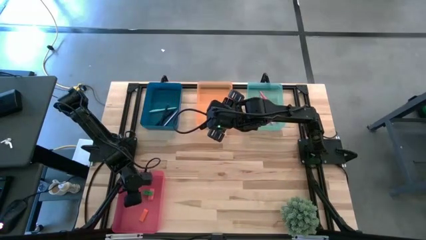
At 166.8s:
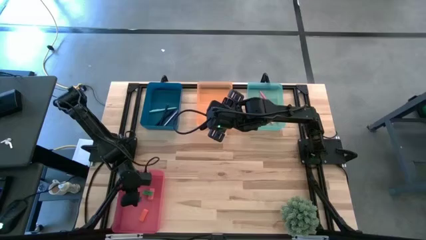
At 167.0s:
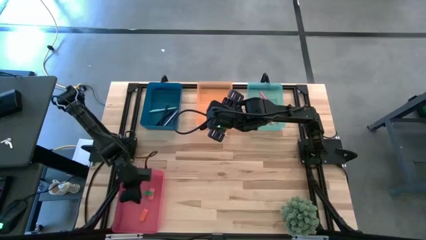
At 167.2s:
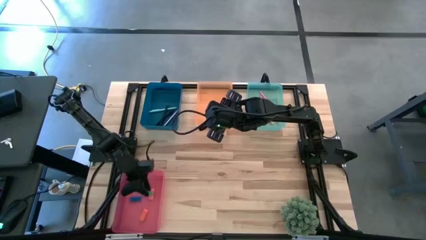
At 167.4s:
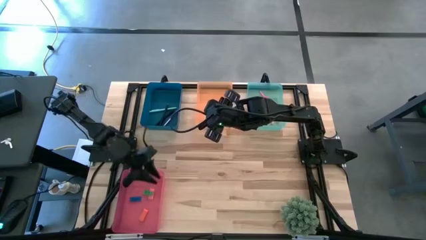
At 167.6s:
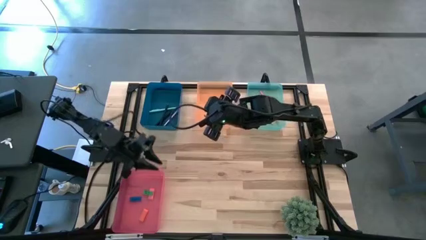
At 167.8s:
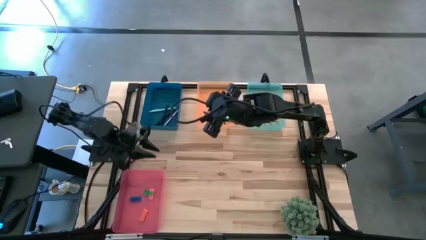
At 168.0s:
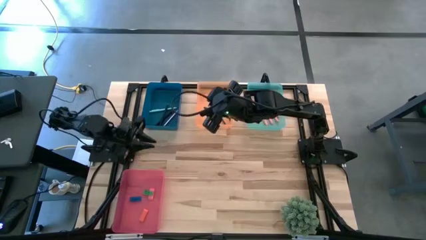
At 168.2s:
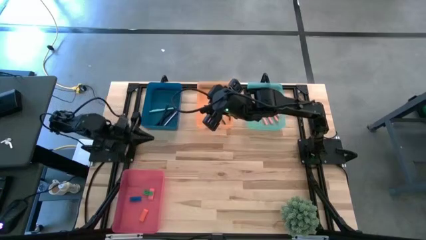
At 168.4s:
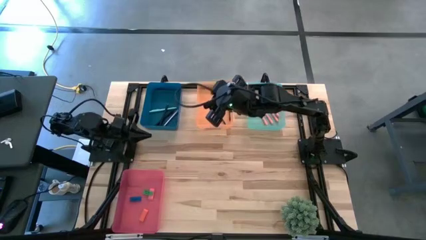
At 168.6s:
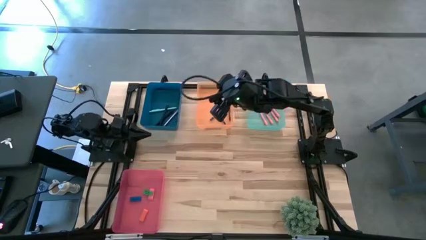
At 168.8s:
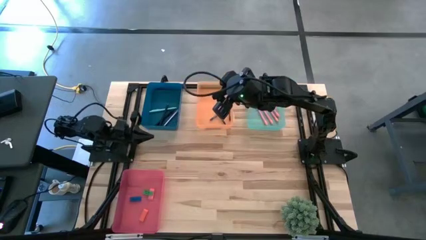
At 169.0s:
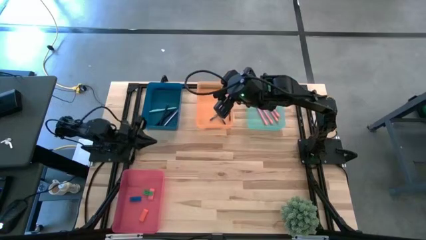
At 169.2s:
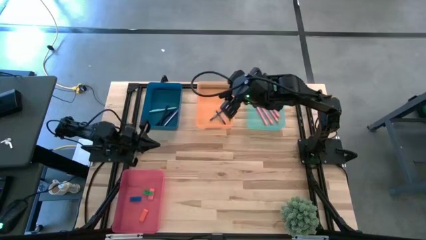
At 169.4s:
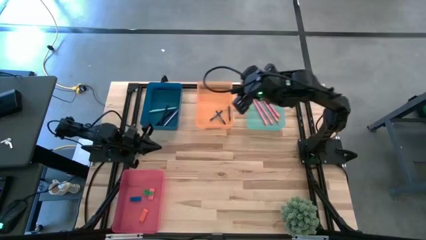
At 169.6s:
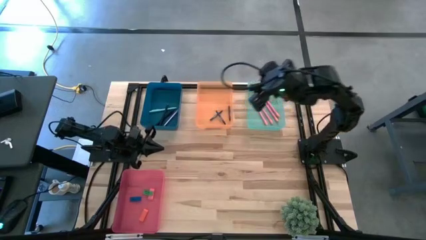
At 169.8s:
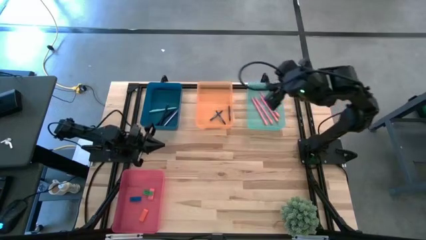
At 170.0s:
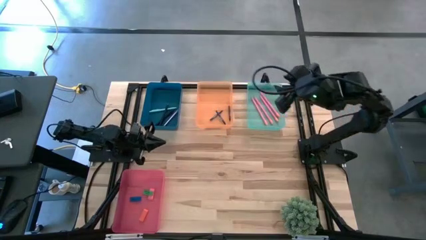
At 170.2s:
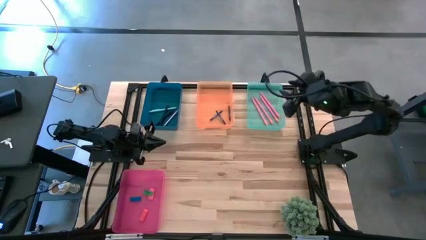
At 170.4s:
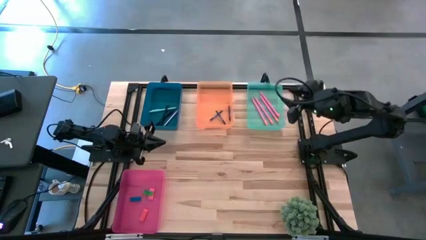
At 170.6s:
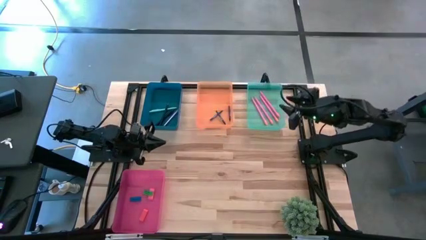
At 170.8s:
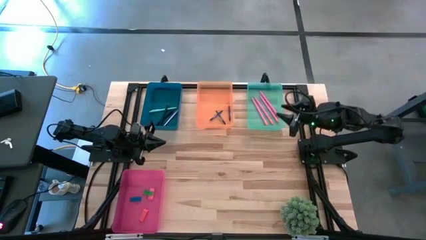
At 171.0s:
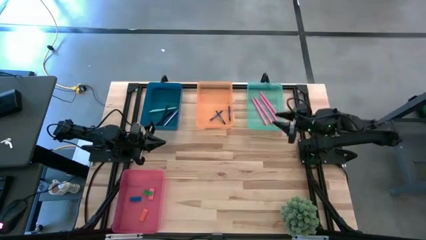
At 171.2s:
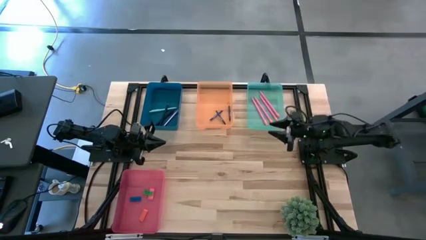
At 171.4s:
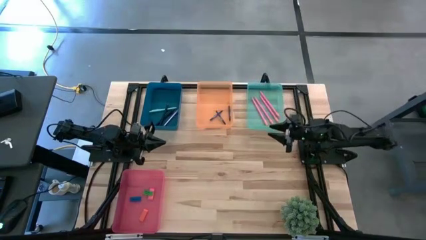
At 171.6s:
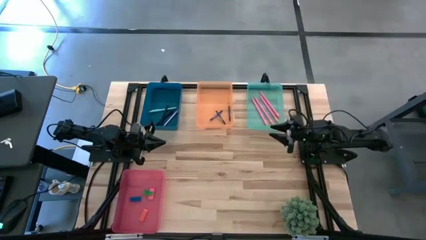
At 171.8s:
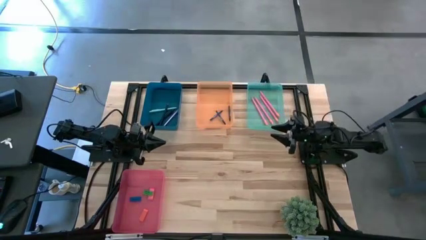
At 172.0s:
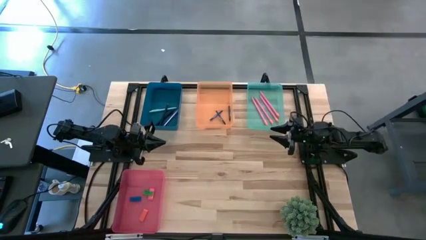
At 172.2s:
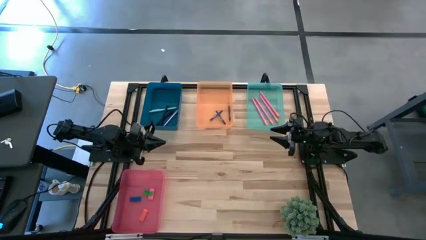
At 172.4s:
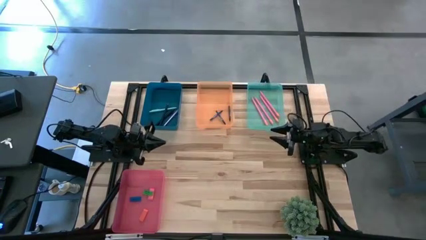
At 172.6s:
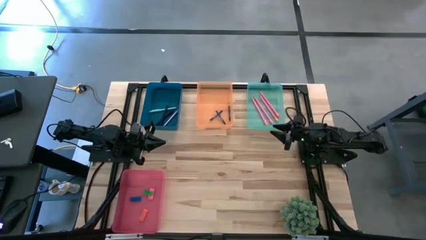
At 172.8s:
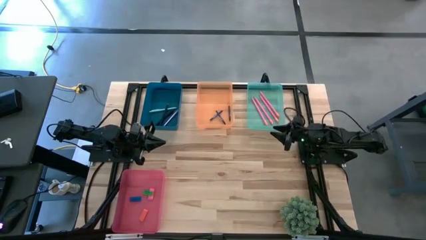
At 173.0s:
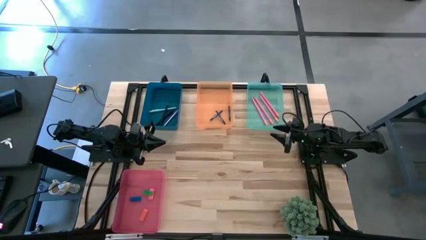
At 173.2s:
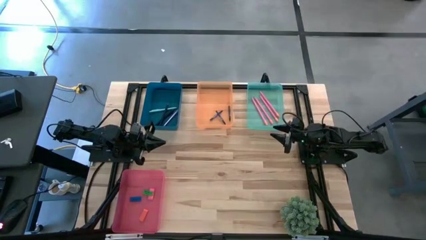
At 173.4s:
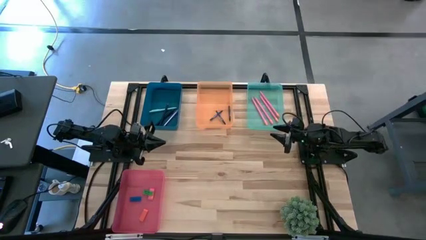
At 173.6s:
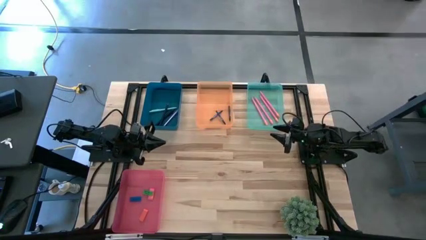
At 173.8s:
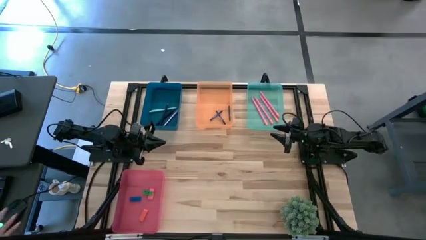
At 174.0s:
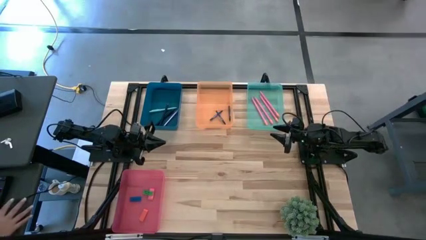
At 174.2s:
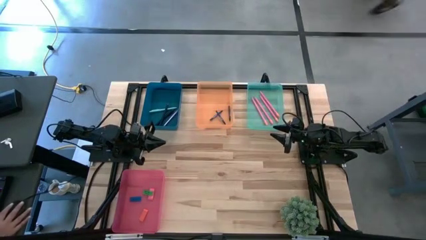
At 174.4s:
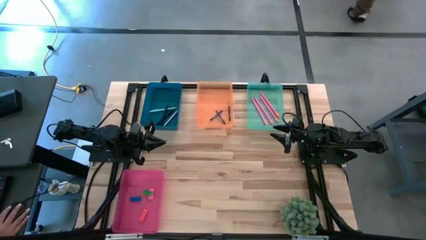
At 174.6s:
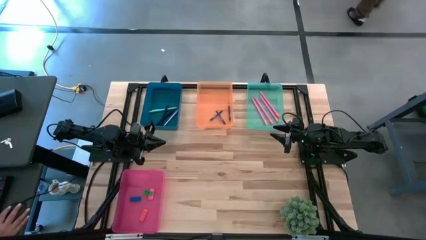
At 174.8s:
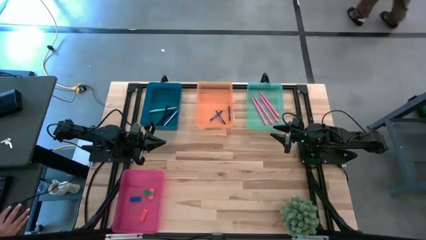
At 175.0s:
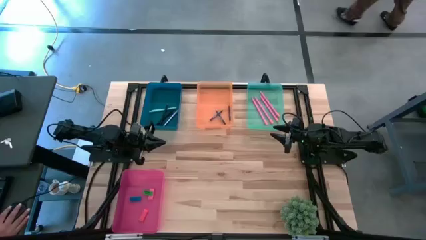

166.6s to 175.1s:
Task: Sort crayons/erasers/pens/pencils in bins
Return to Home Position

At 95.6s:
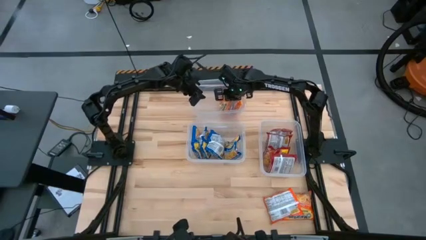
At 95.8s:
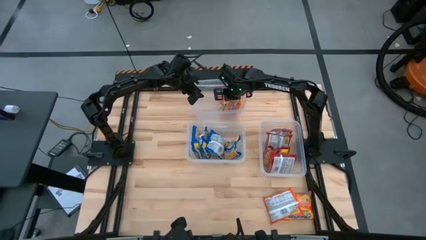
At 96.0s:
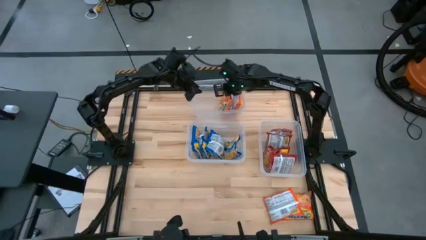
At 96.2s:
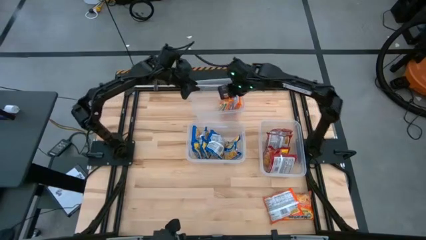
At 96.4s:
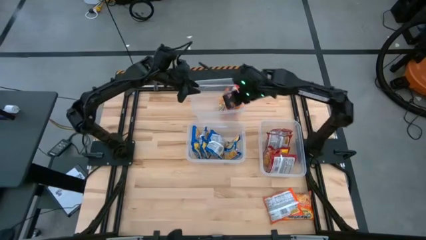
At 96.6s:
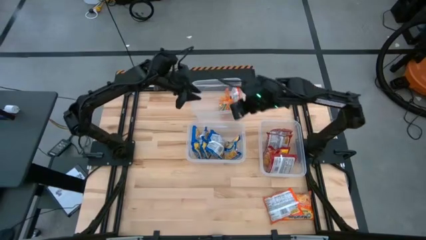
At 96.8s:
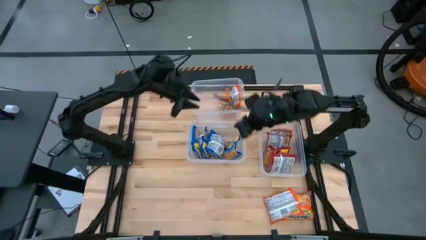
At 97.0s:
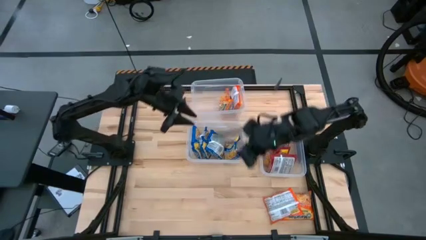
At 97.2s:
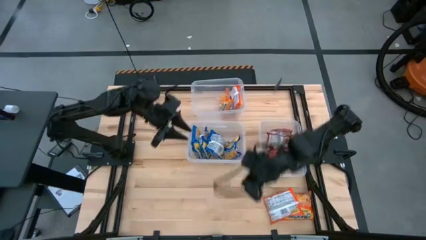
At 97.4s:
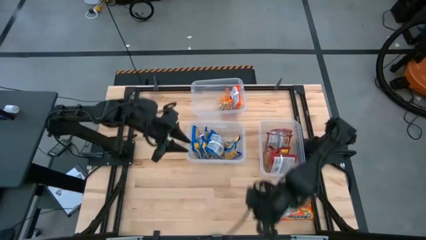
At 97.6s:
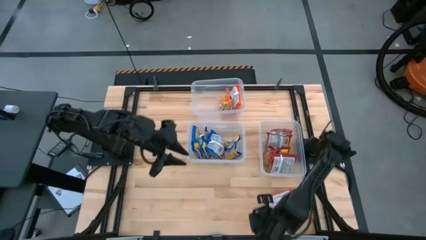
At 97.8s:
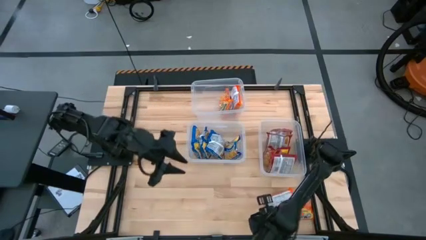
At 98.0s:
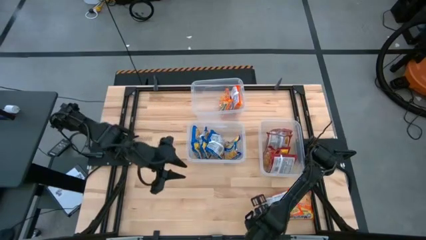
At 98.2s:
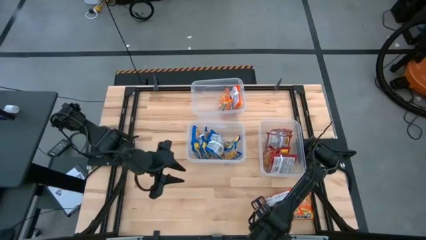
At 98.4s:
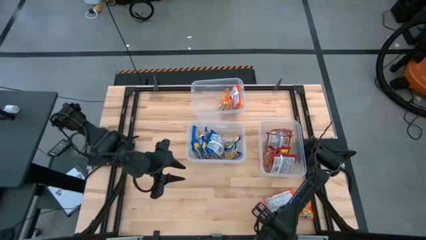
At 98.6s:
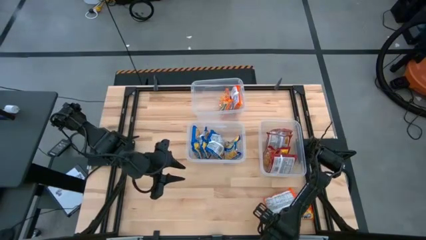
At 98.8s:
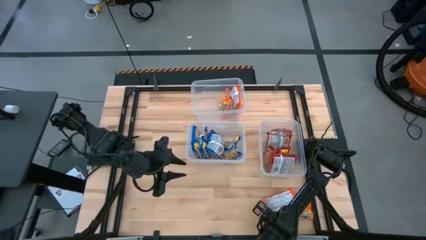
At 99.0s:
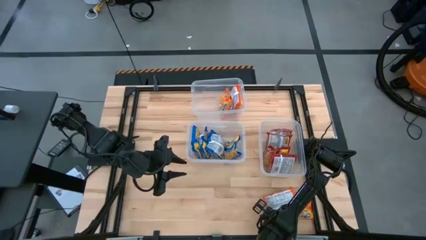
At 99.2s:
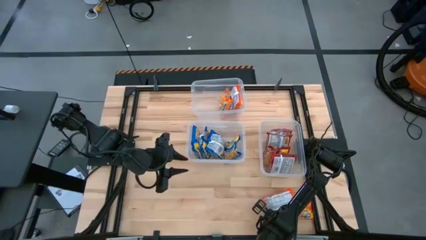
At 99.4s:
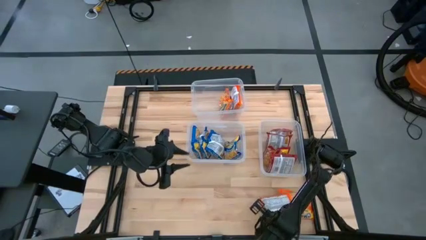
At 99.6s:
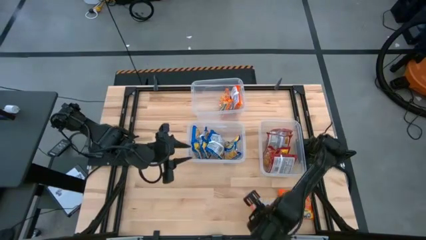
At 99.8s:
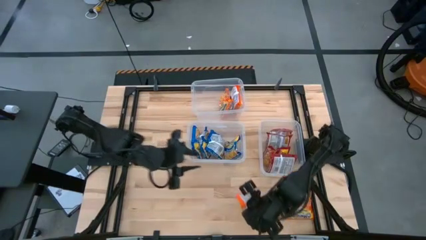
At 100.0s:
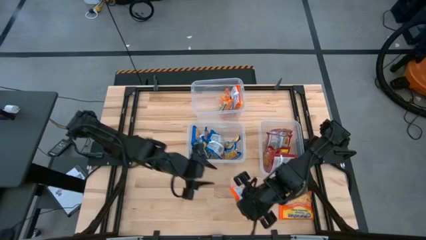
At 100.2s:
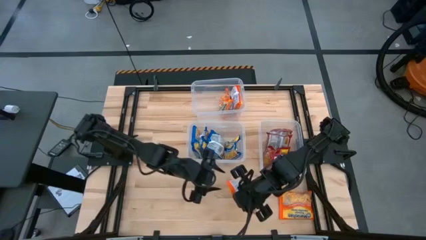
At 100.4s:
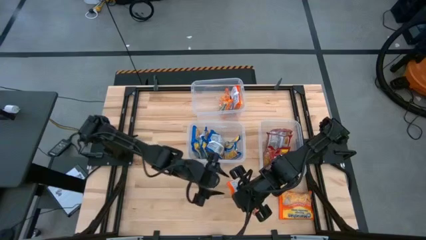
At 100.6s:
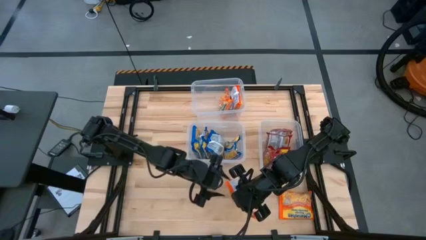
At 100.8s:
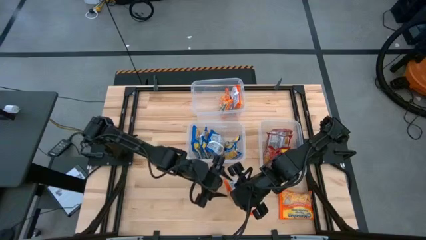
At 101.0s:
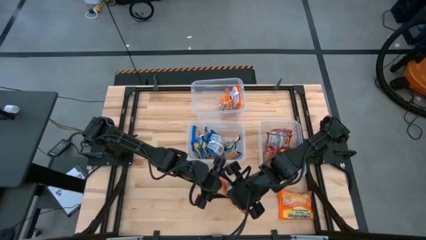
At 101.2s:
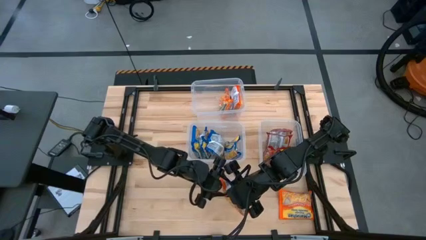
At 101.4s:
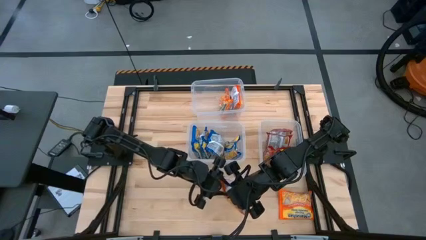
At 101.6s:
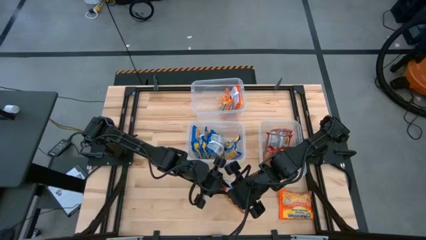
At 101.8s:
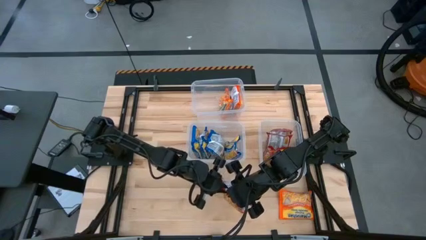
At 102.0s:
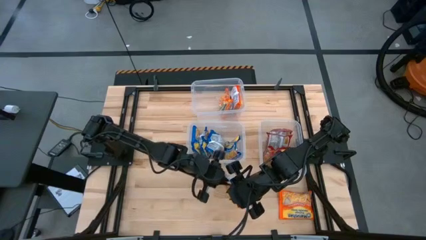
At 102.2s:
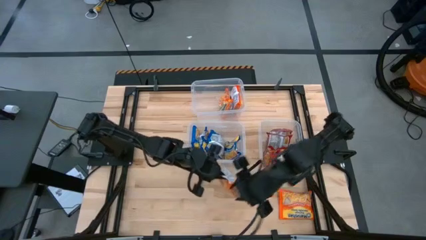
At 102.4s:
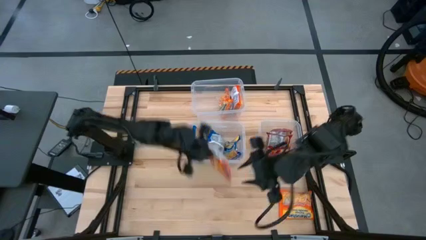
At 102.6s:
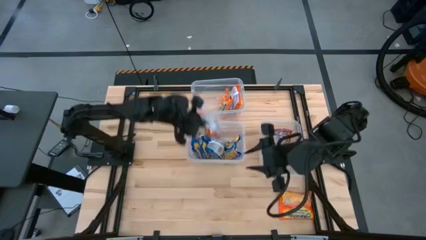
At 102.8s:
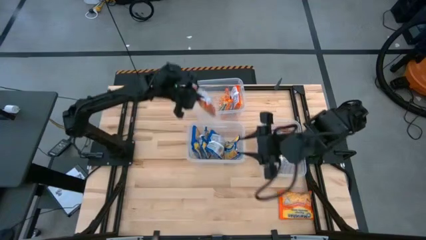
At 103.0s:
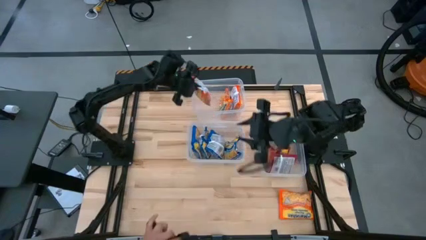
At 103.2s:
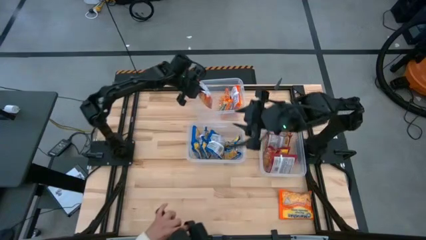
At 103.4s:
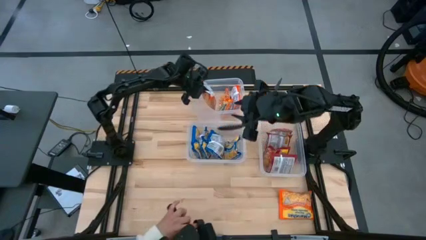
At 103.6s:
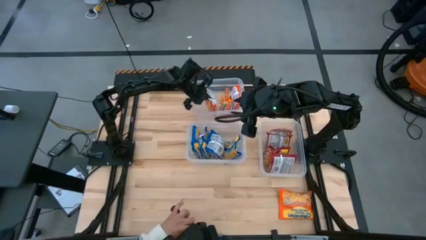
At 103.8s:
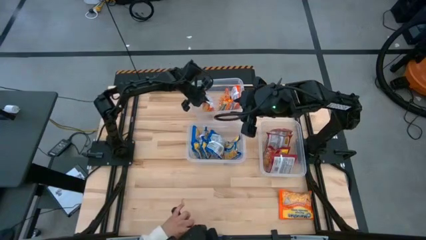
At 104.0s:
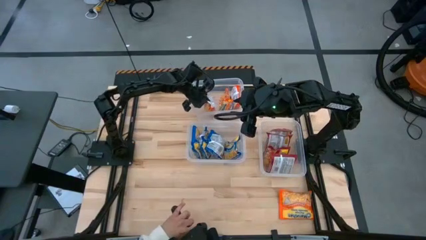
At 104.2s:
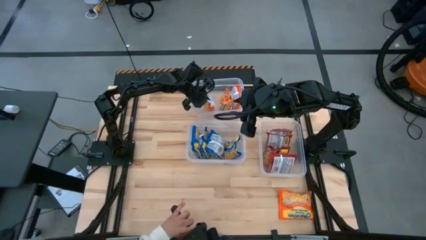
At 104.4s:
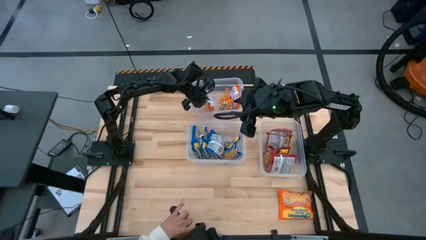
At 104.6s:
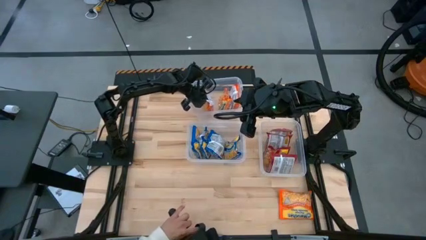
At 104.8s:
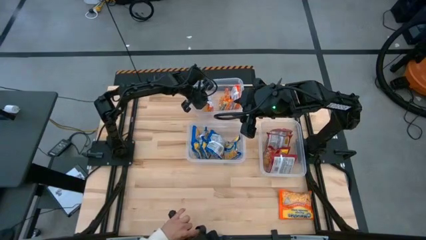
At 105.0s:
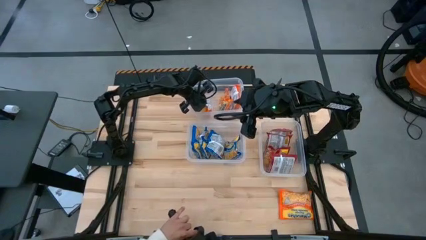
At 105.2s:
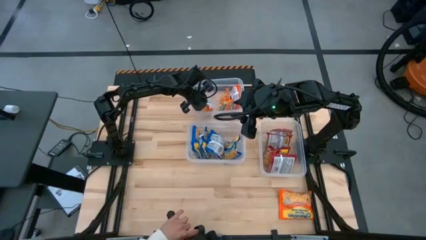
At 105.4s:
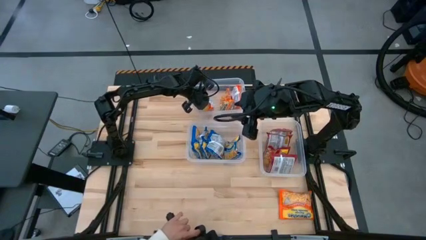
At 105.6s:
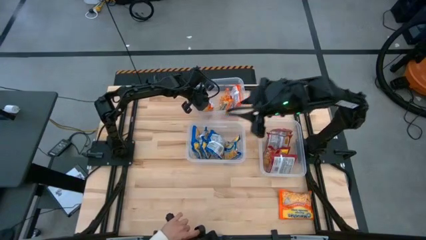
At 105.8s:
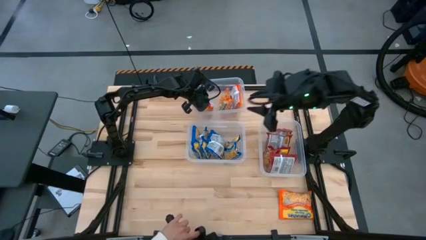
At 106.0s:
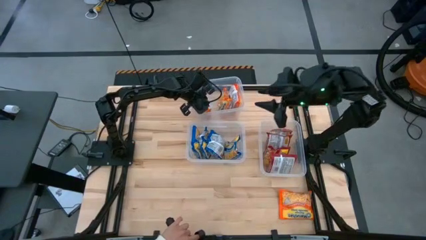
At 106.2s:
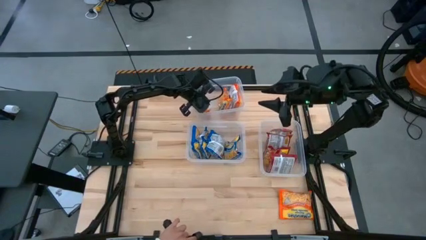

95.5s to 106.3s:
Task: Sort Maruchan noodles
Put the orange noodle pack into the top transparent bin
